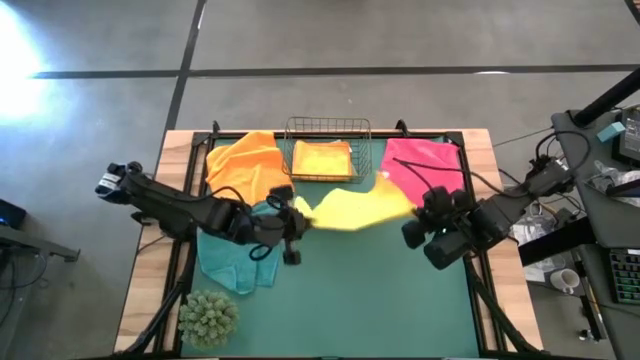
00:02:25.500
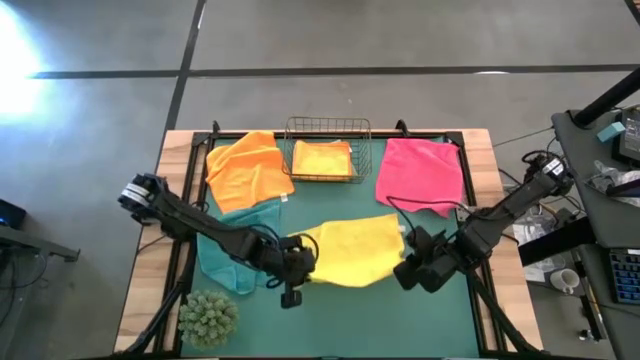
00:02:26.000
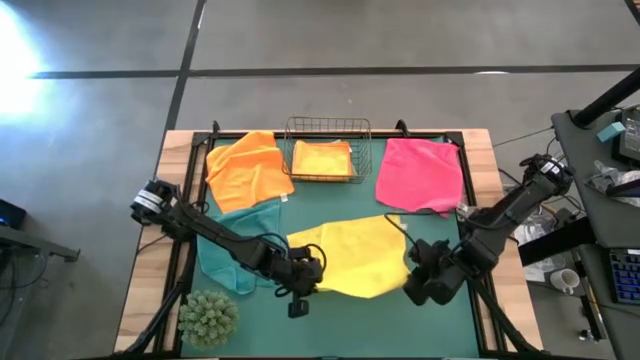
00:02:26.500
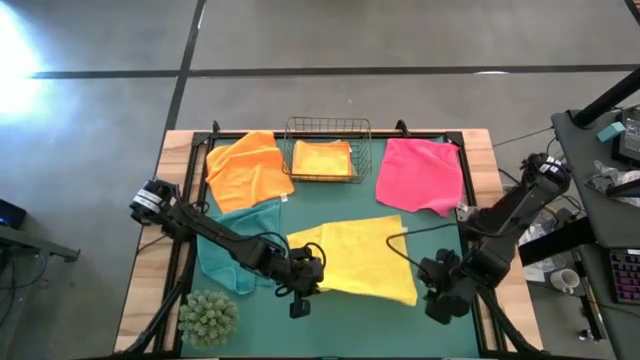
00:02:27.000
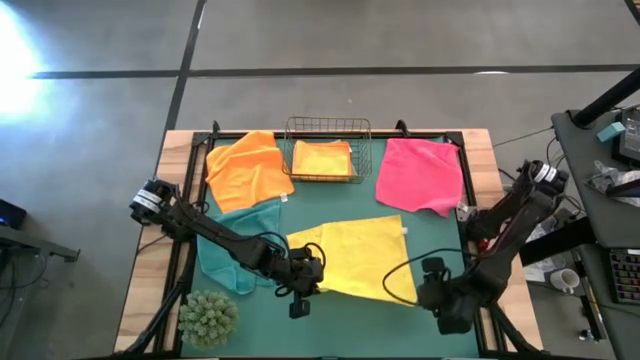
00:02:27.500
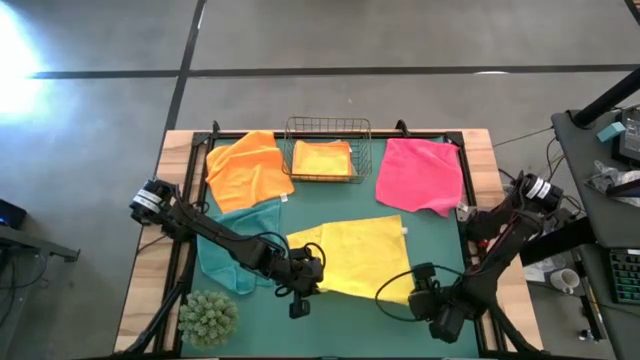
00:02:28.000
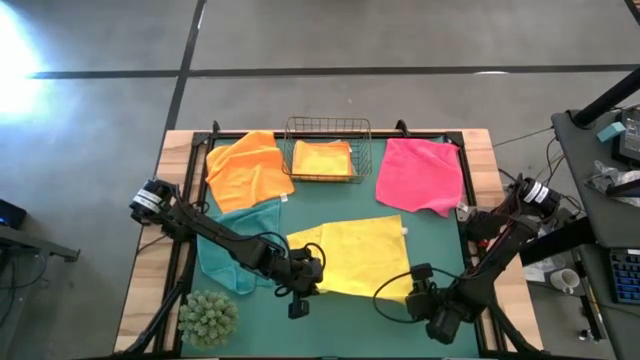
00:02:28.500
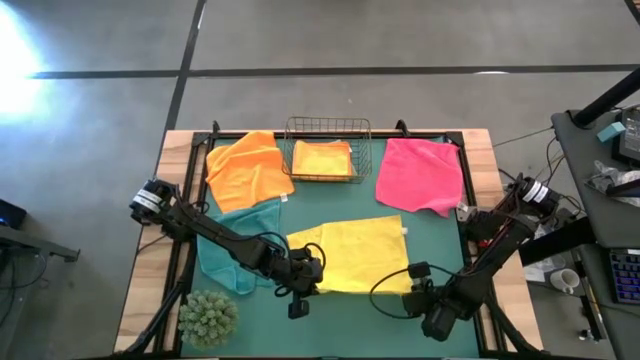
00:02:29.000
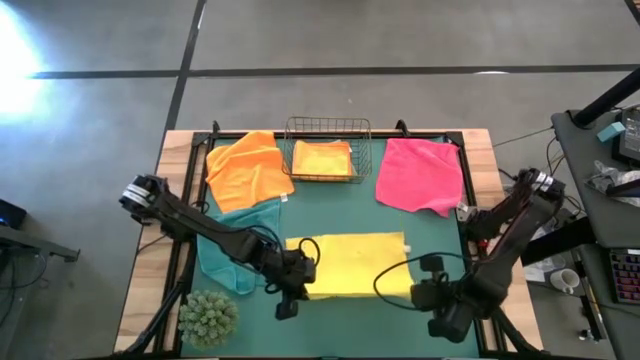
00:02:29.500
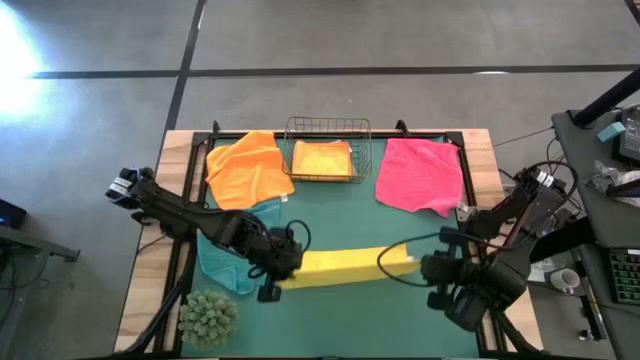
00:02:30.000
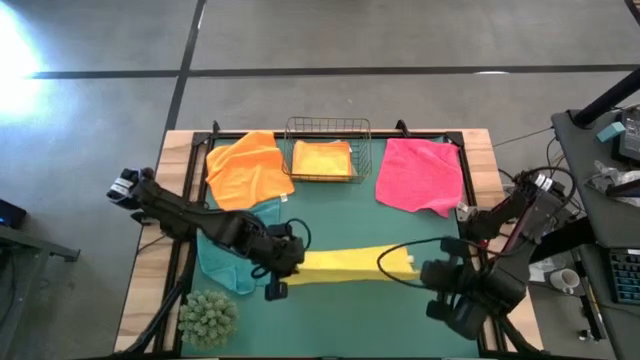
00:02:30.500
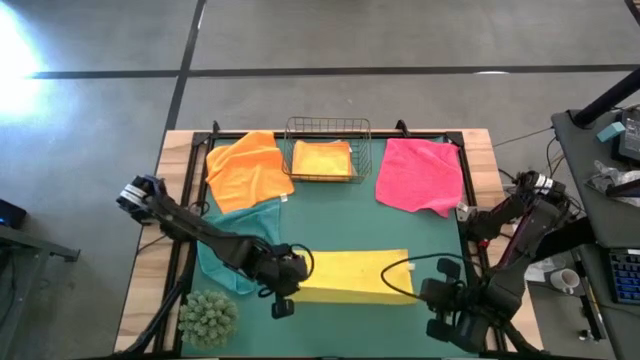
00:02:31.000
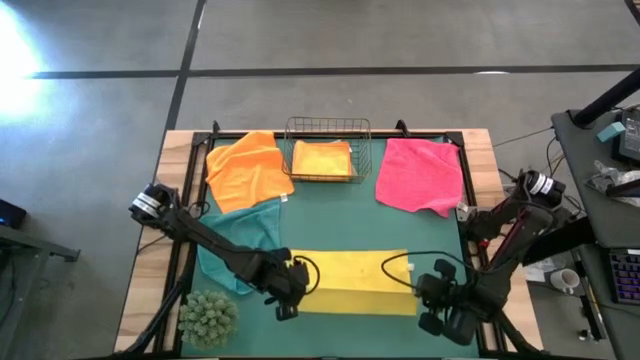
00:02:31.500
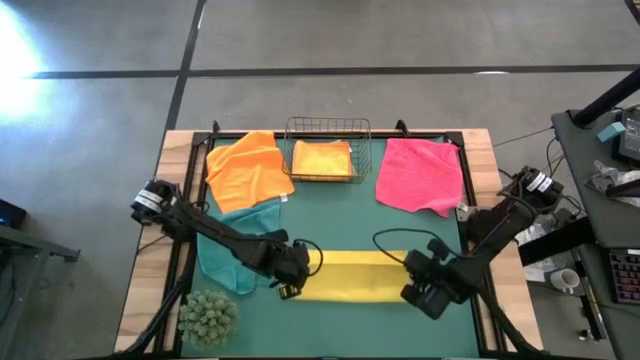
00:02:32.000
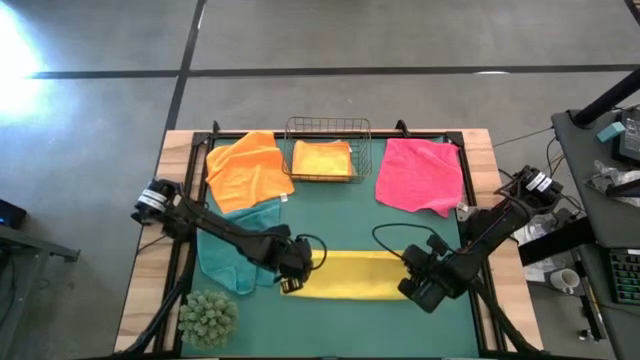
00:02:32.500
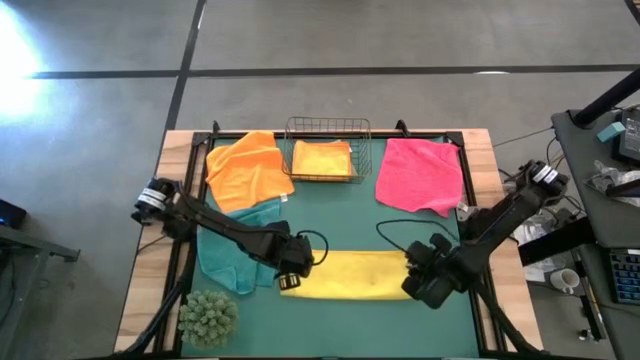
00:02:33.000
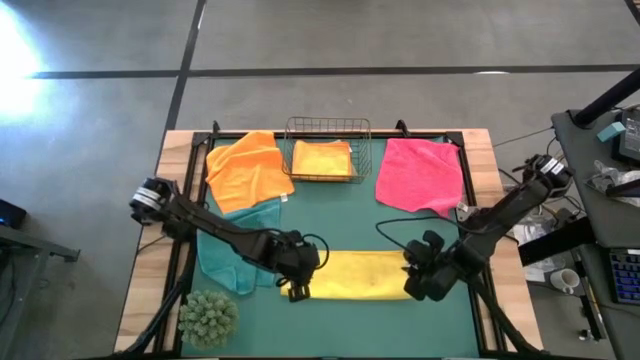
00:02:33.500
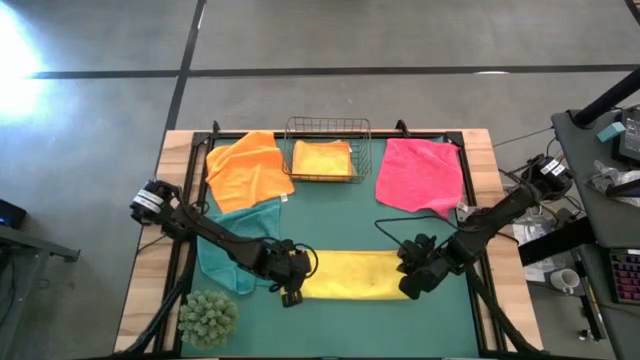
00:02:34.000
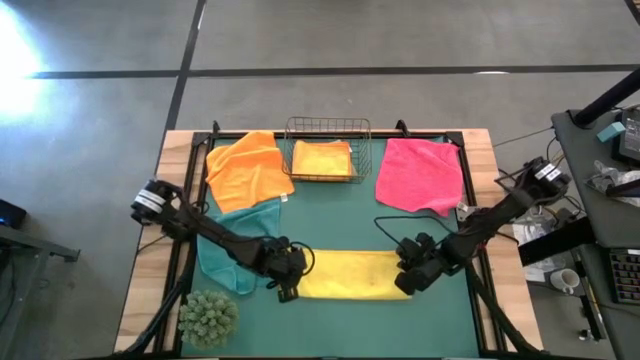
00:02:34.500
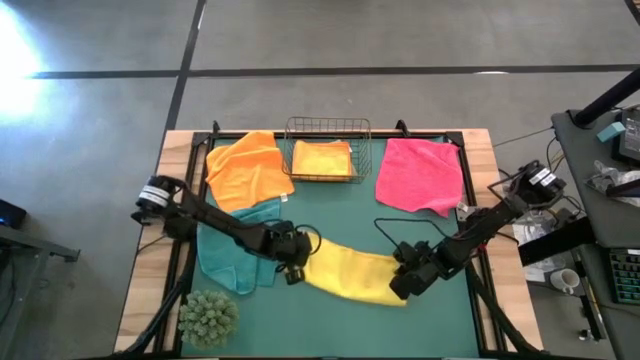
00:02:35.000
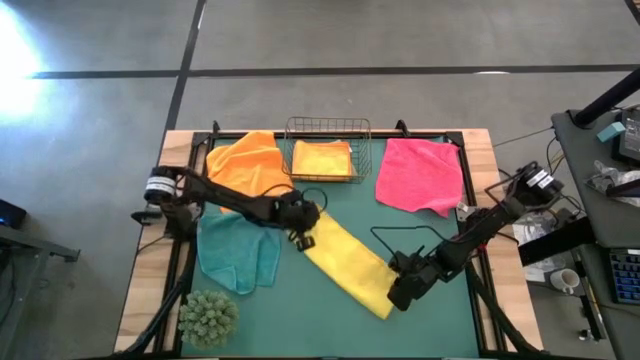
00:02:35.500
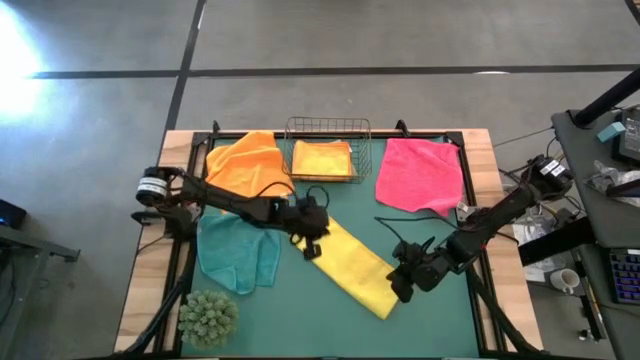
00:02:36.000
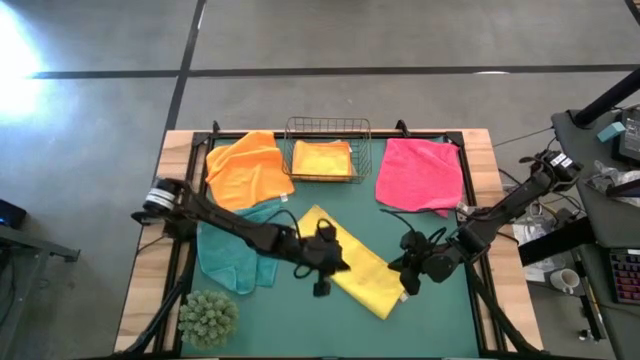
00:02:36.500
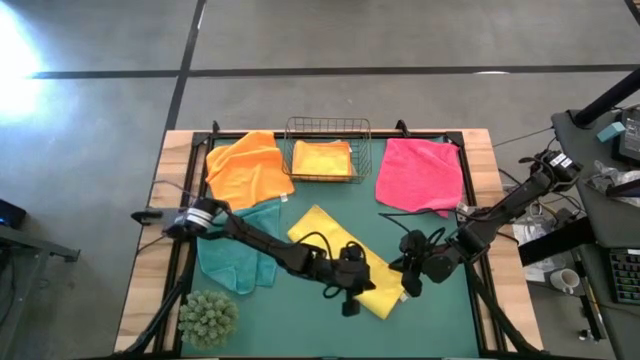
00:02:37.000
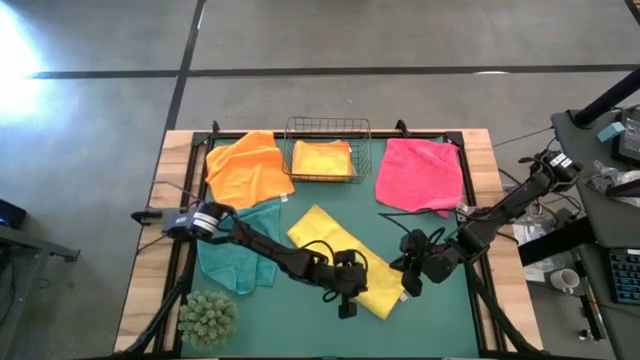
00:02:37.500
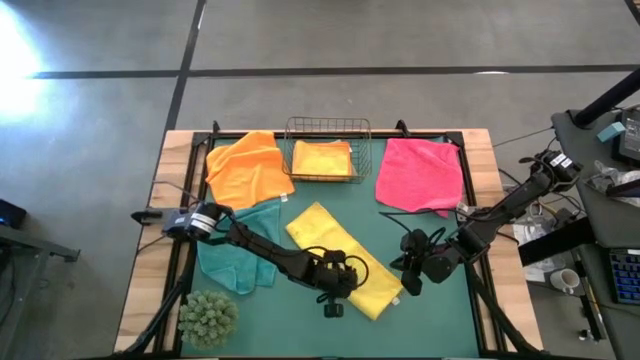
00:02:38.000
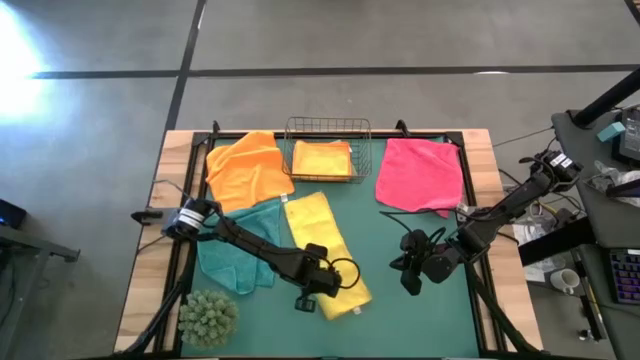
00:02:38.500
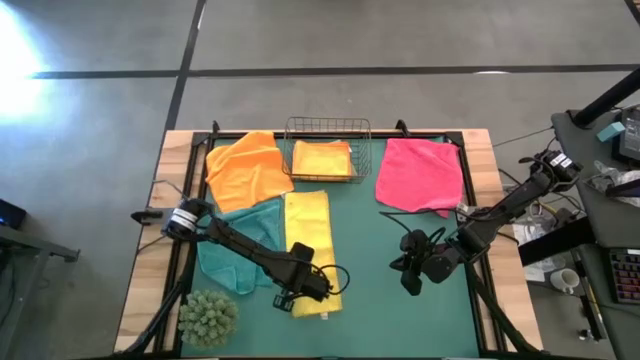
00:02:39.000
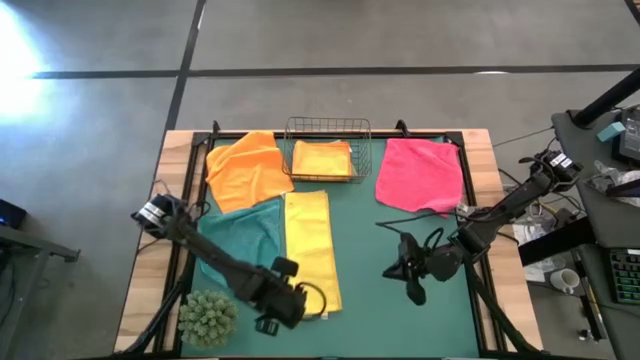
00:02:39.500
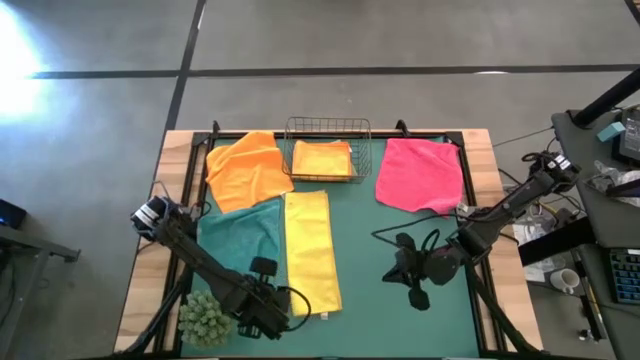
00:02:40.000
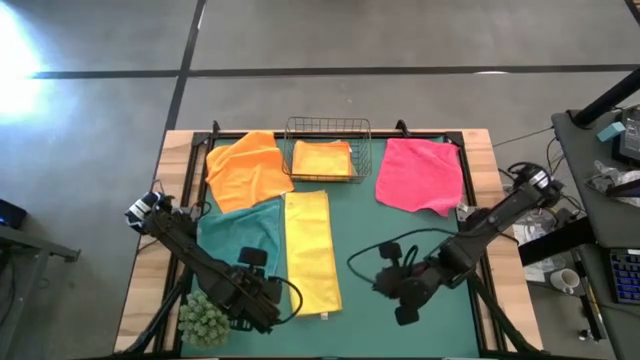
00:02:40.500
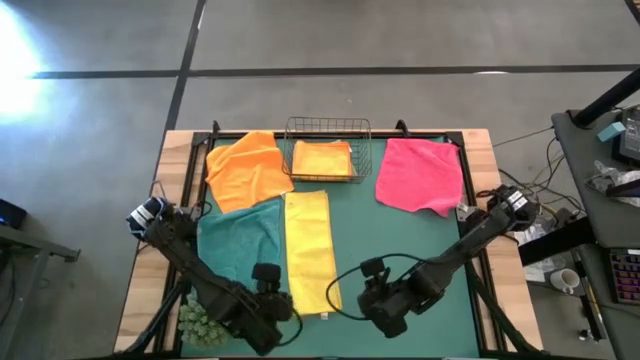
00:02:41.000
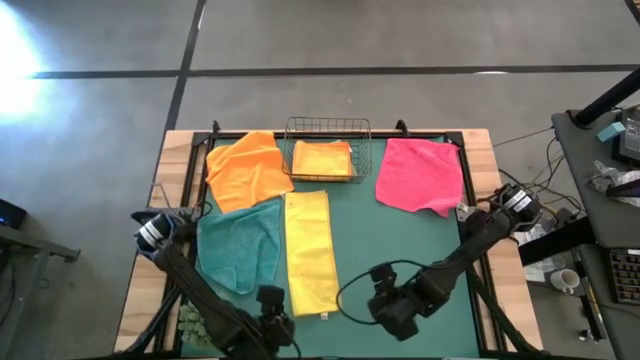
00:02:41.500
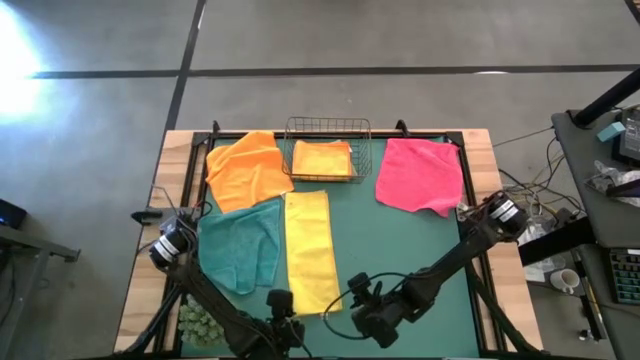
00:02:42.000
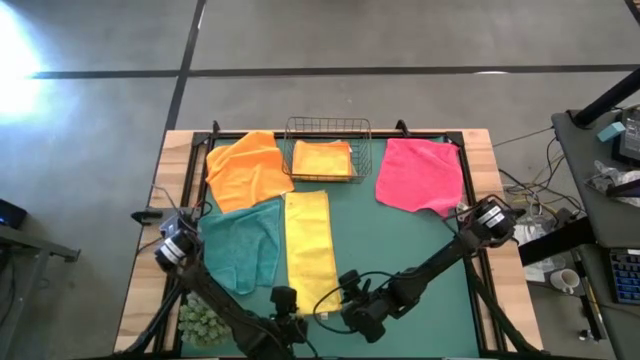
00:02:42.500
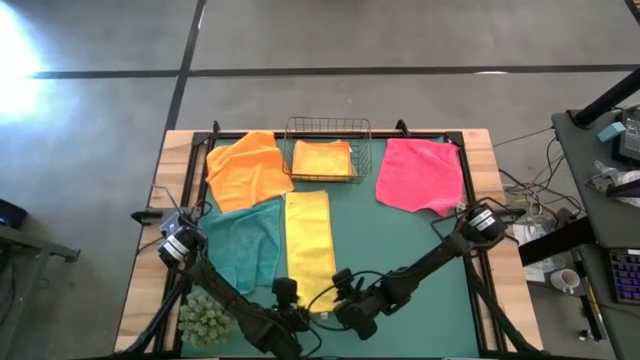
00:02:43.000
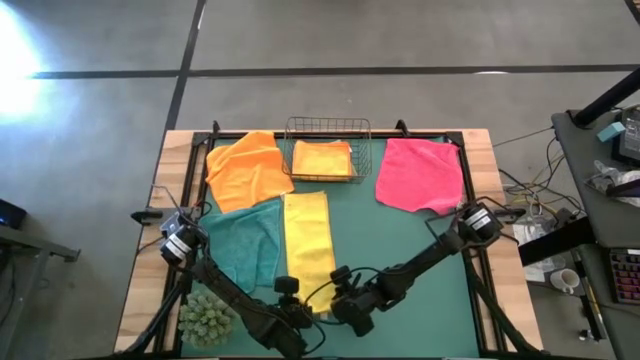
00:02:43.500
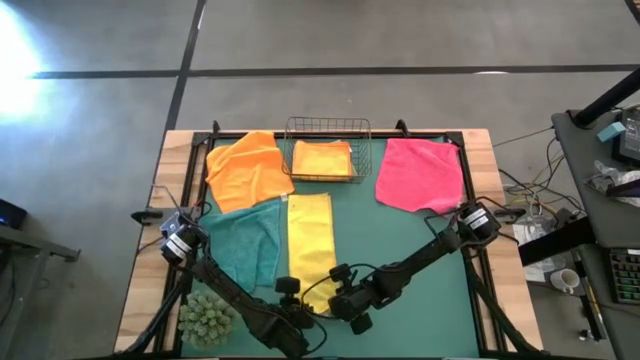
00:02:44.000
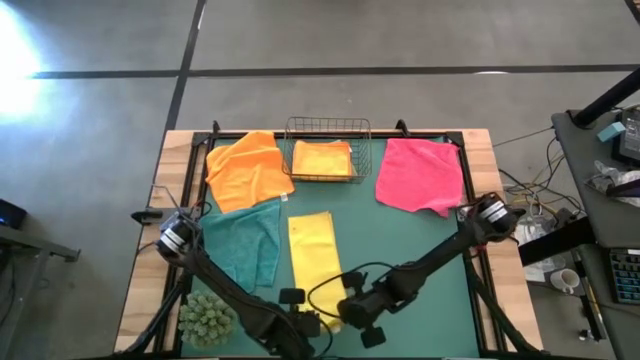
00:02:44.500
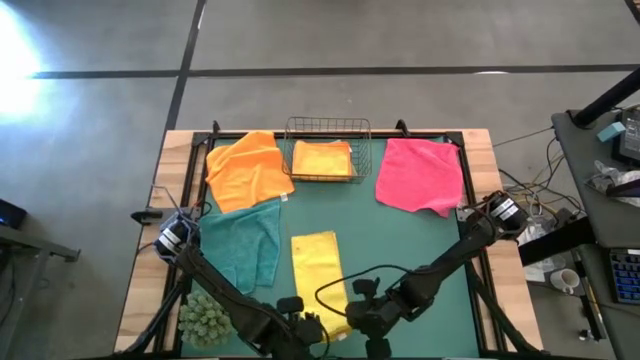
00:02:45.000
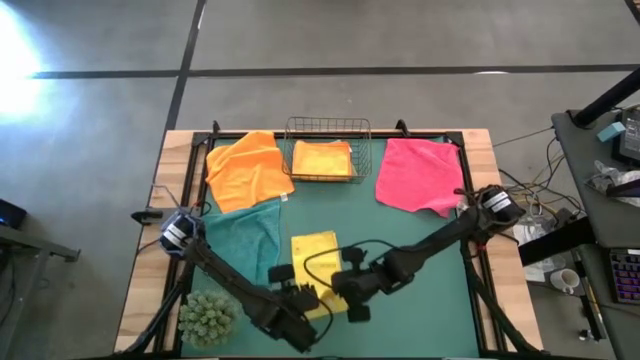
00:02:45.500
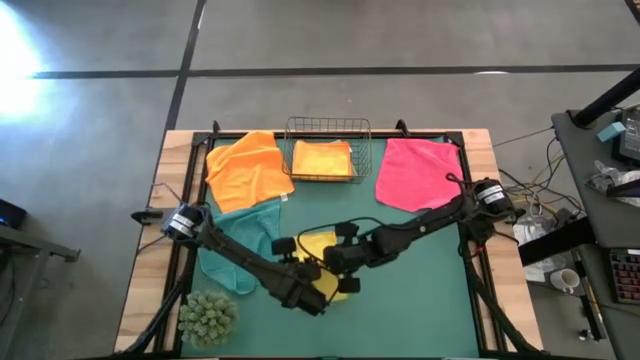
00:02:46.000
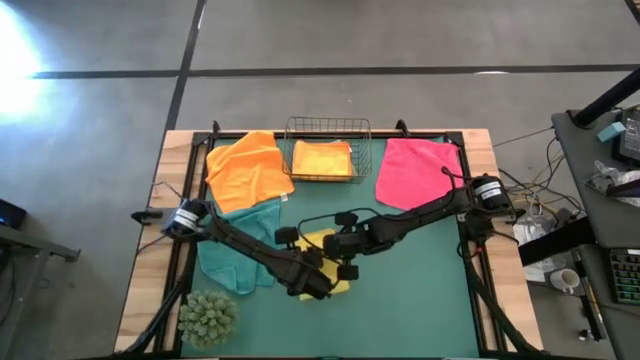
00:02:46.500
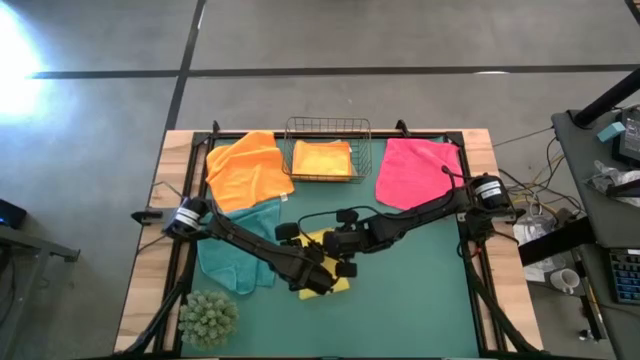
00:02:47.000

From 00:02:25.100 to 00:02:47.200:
Task: Fold microfiber towels
Fold the yellow microfiber cloth
